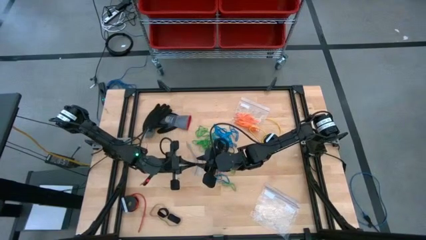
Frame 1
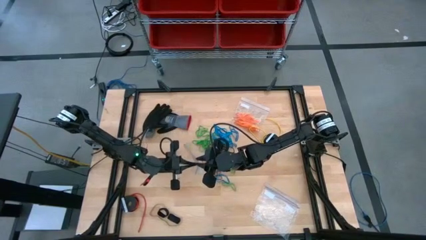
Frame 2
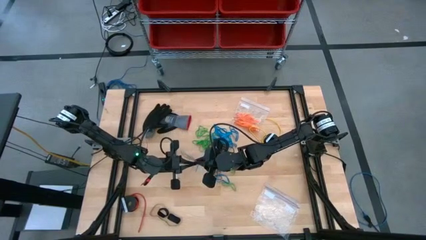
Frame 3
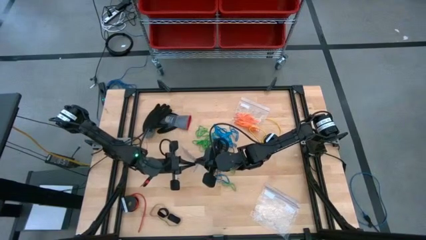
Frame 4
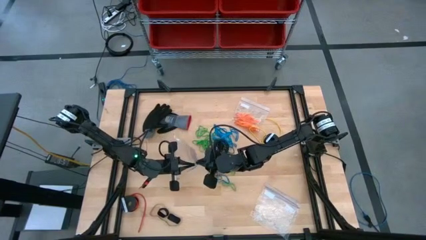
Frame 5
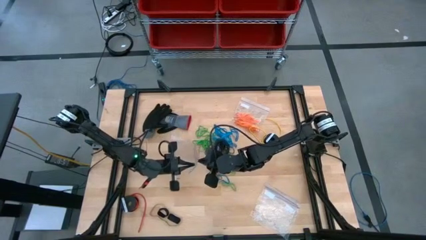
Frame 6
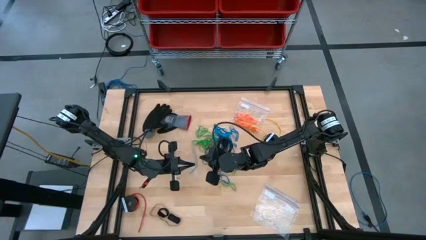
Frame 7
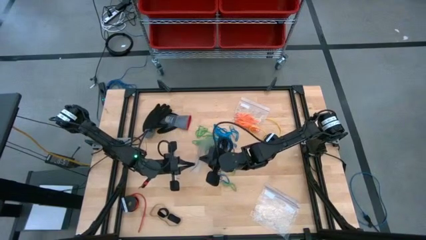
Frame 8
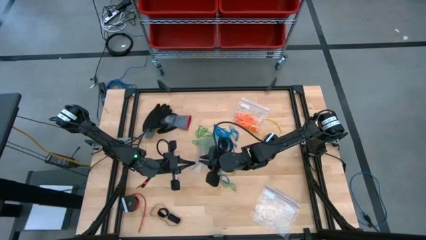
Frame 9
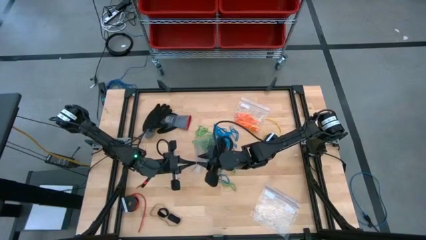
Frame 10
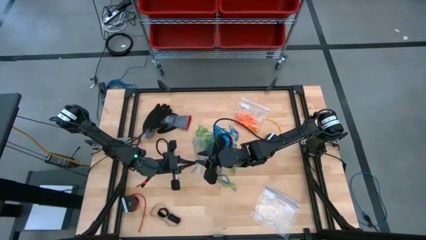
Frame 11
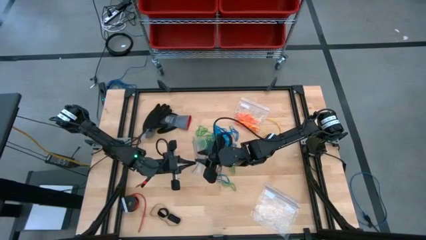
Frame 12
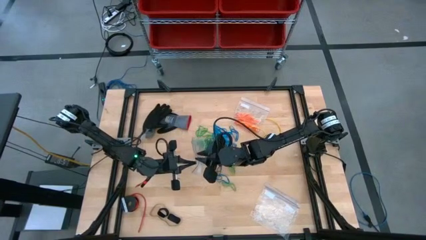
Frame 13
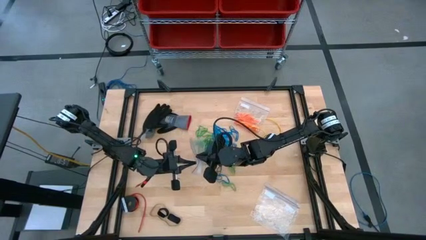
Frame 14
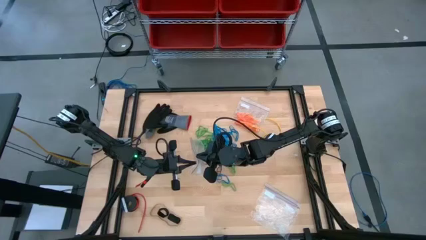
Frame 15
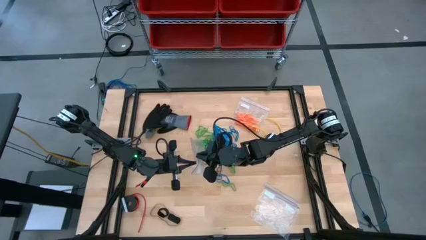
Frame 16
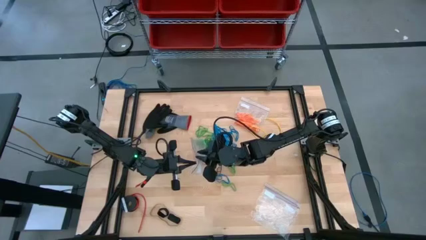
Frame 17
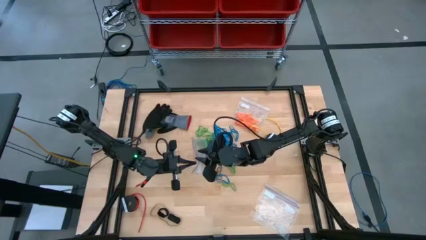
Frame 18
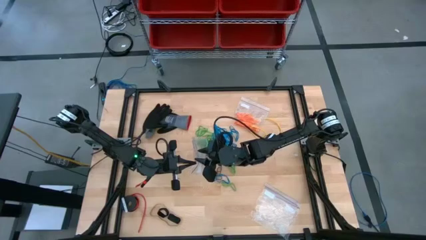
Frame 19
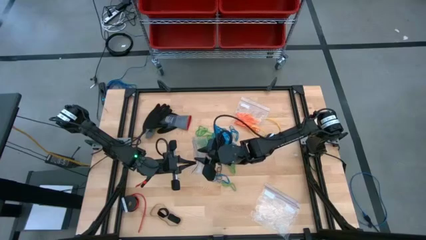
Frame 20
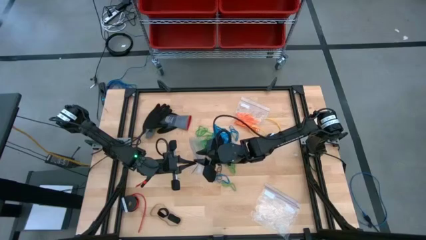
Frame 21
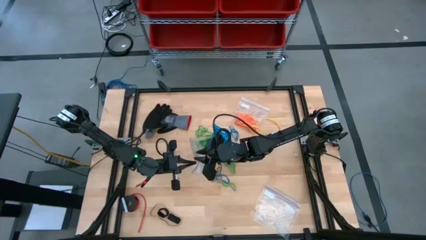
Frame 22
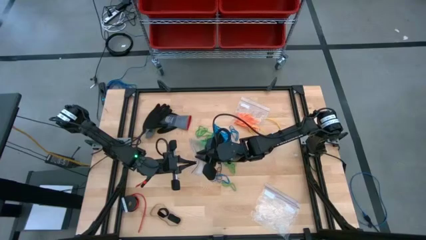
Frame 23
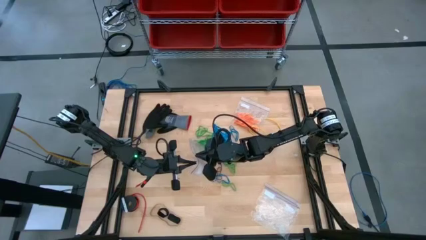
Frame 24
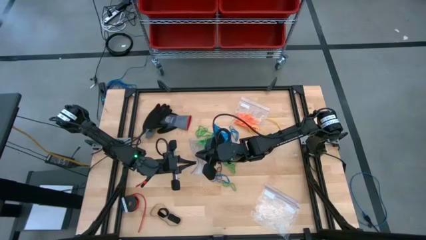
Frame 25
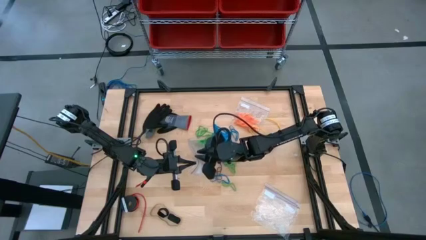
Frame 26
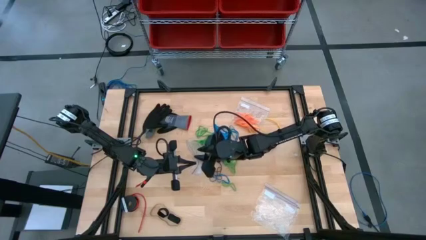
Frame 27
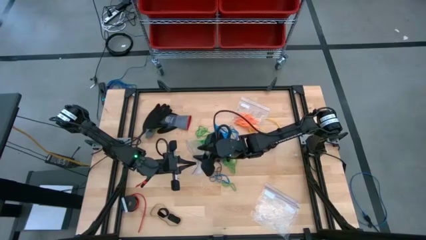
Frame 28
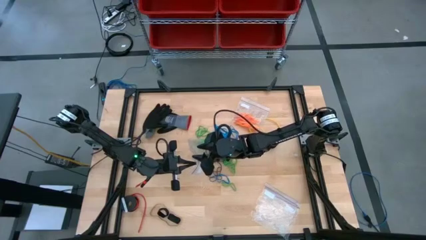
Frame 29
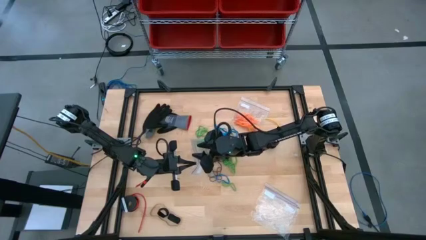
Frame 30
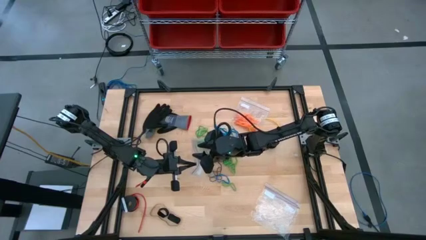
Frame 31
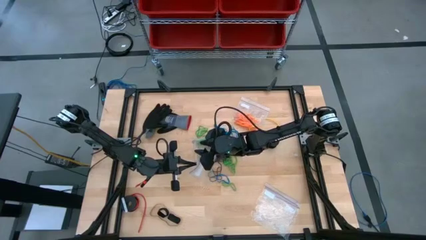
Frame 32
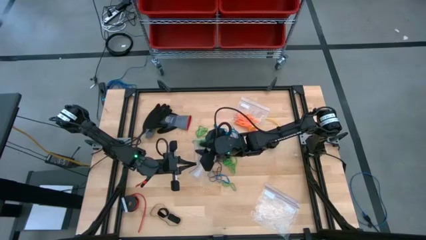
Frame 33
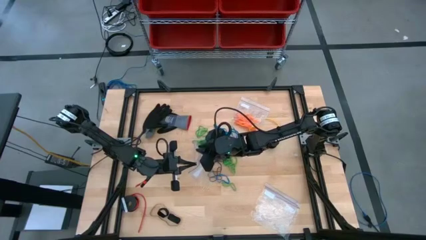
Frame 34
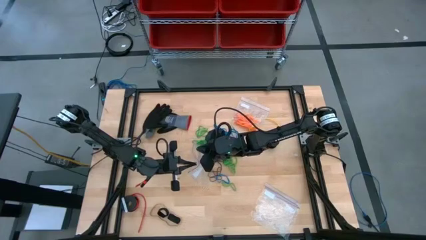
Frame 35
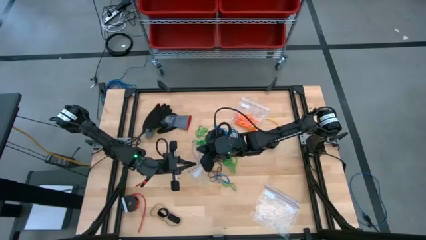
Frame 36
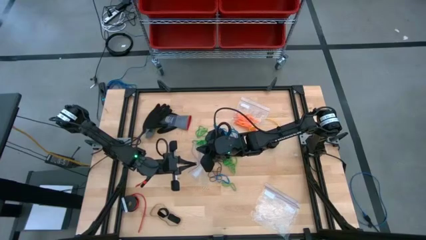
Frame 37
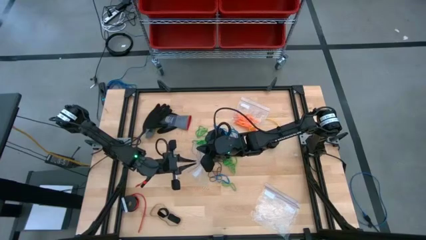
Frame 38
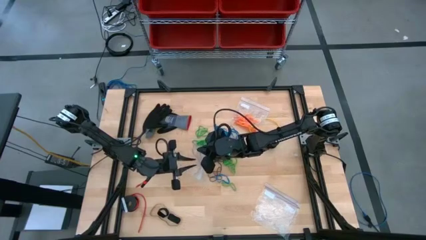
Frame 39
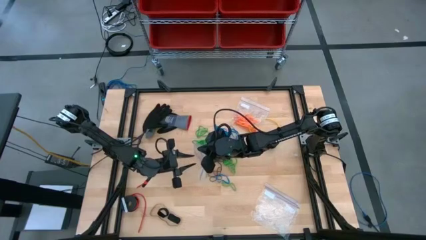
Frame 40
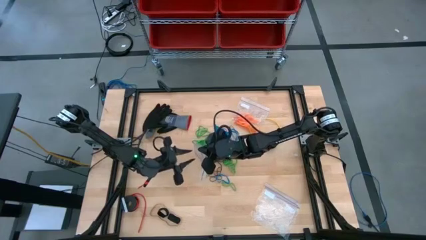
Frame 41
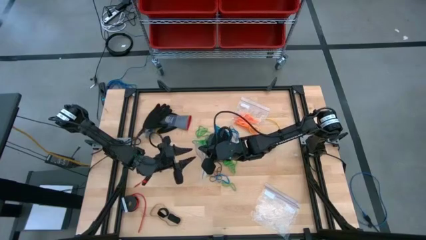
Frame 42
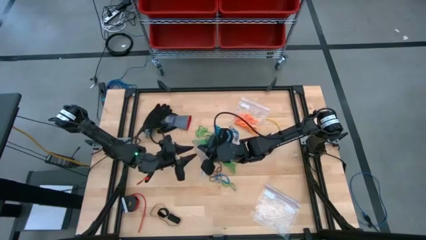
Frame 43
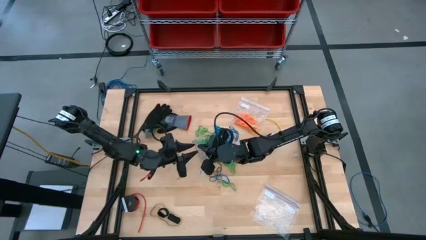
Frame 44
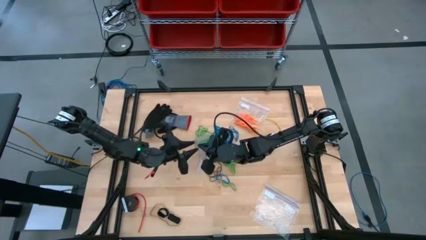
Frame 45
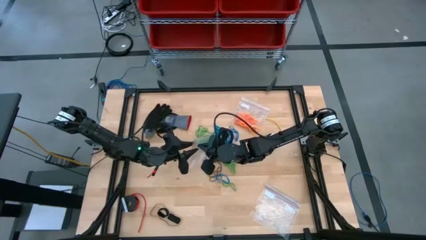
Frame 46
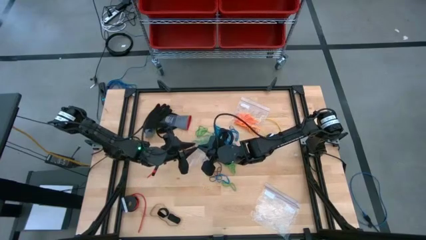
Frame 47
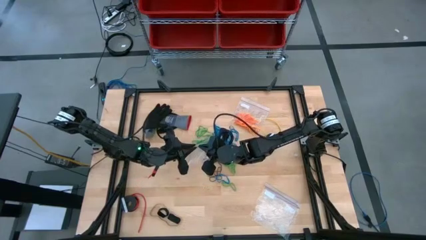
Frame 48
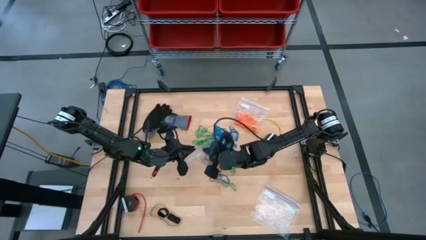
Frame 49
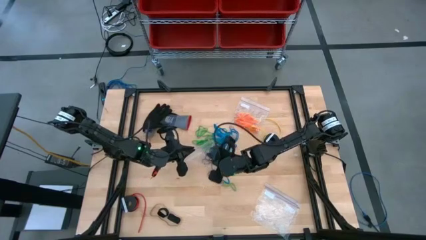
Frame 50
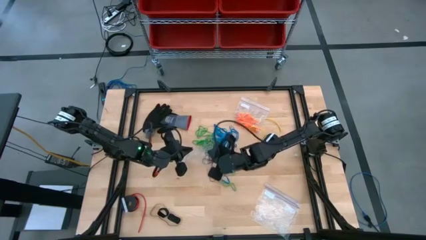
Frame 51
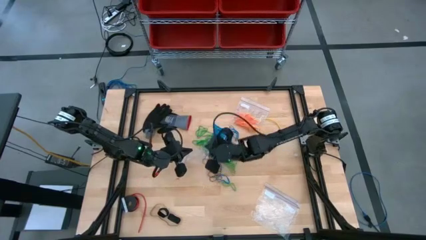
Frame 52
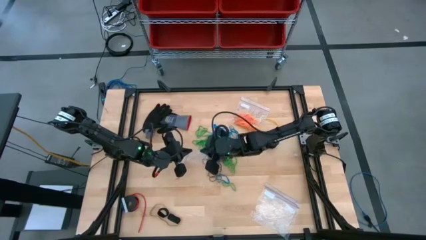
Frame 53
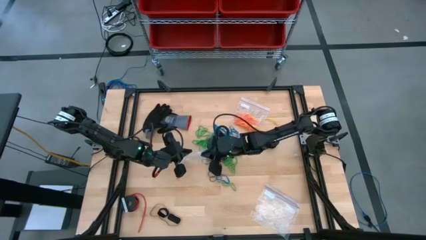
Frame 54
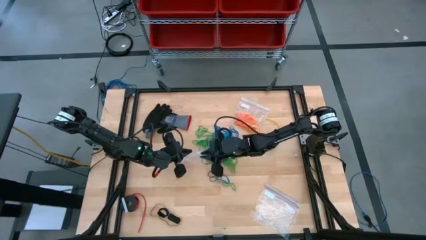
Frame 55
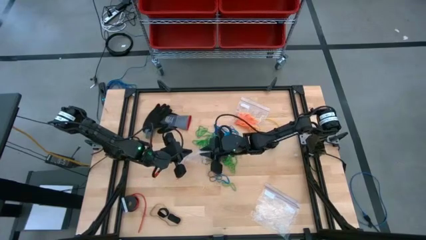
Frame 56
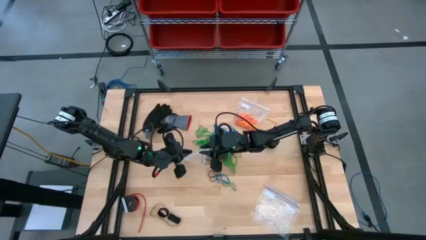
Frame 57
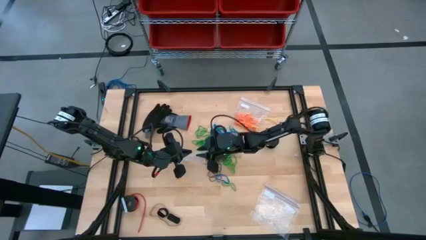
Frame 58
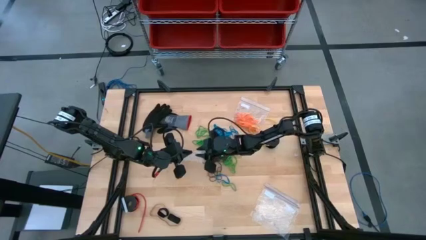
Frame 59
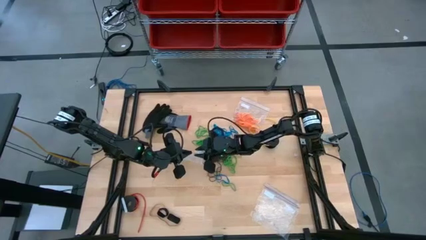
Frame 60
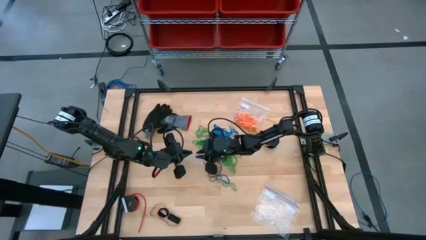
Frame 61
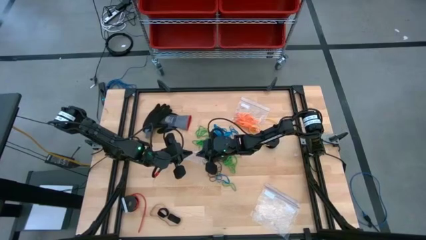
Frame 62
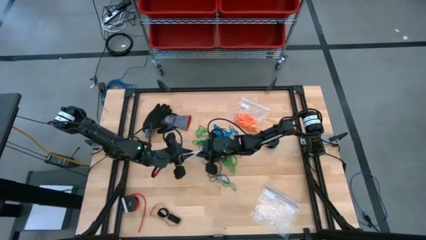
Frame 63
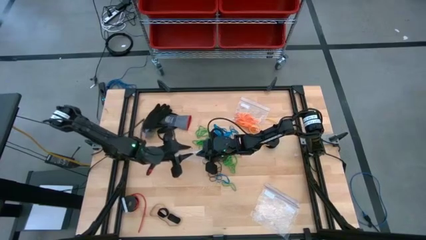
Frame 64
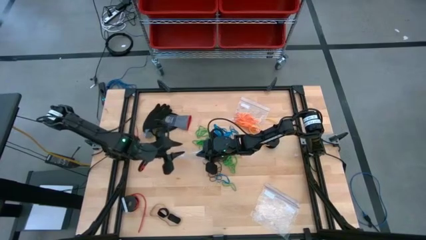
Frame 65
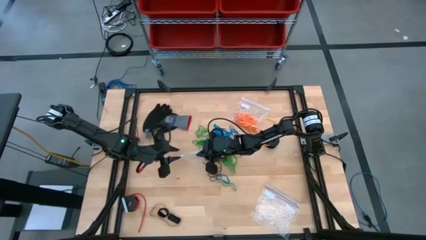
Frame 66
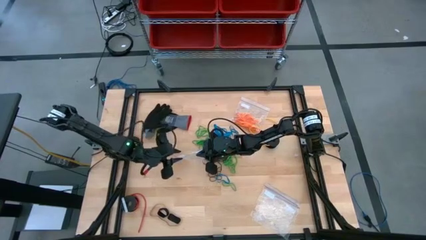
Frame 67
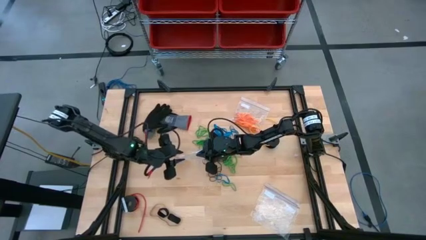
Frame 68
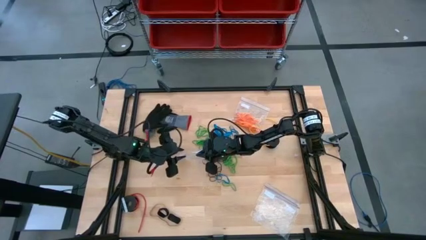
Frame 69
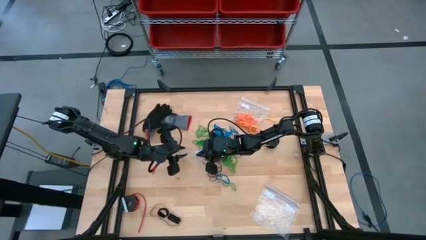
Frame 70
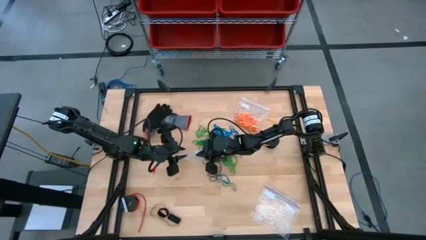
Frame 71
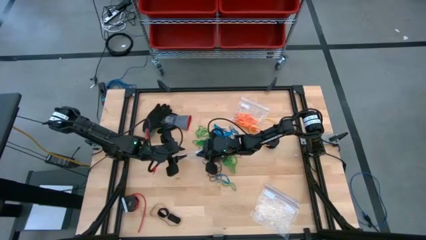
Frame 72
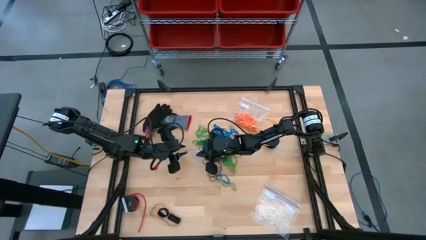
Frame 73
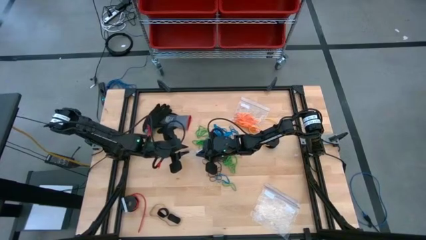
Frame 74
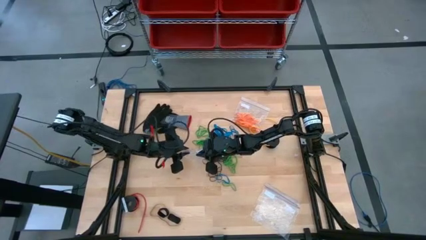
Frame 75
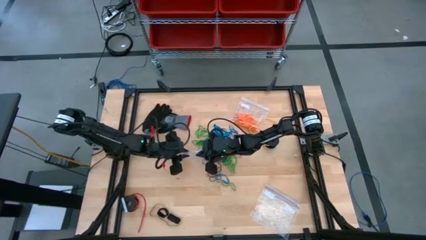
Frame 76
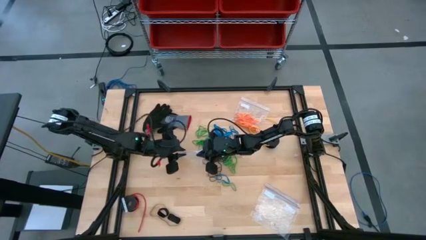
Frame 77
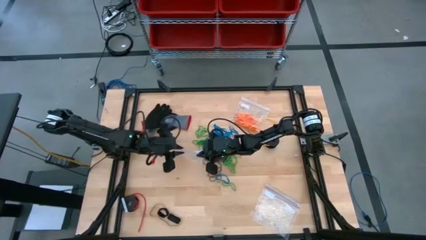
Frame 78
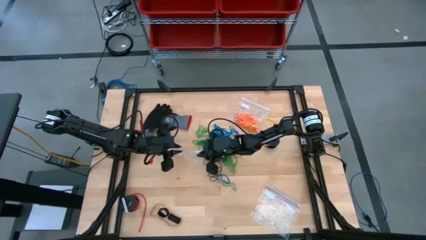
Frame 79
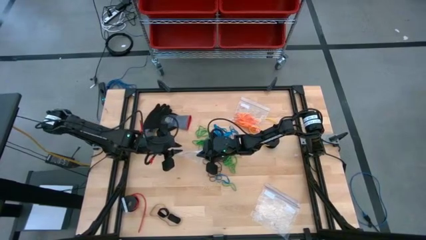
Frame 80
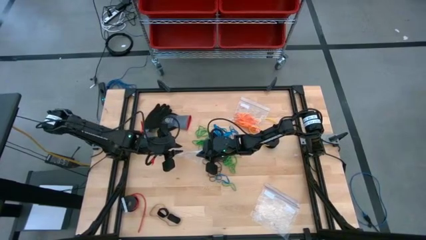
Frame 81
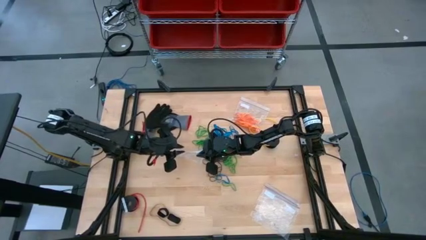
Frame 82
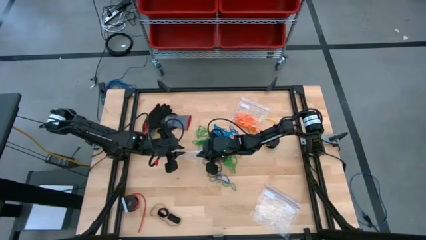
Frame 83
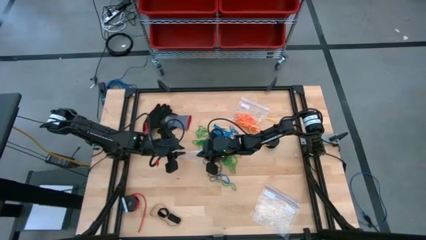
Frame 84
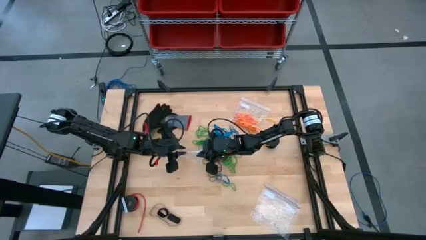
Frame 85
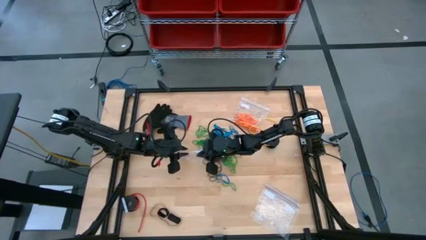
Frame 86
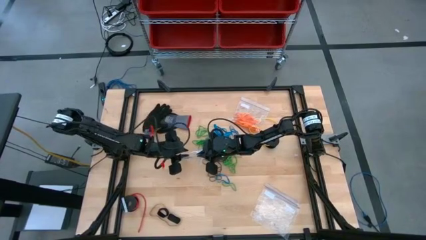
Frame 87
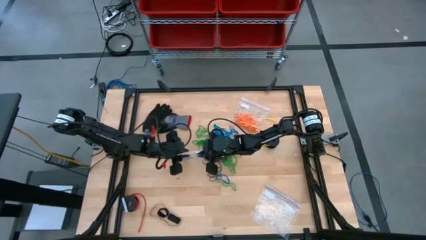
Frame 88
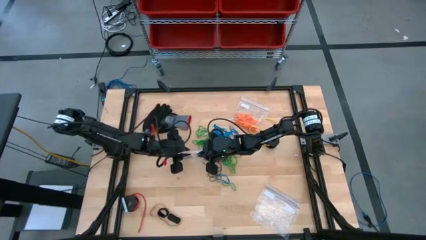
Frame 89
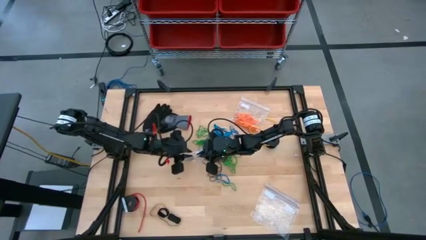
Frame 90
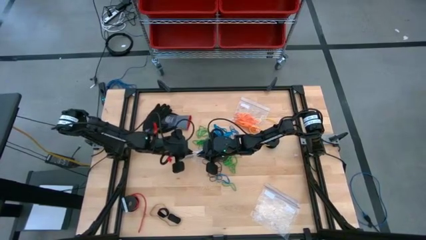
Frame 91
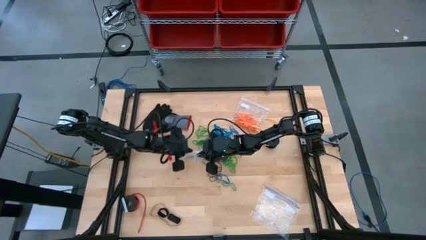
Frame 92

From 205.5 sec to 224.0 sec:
Task: Sort rubber bands
Open the transparent zip bag
